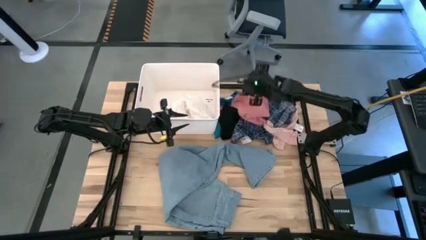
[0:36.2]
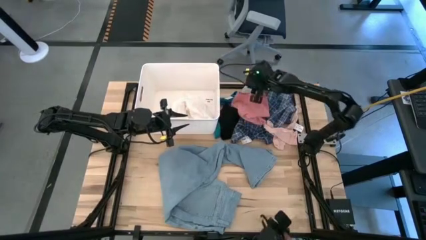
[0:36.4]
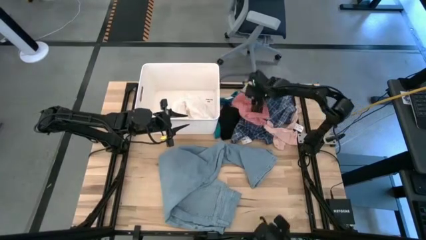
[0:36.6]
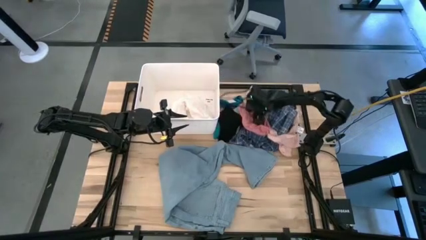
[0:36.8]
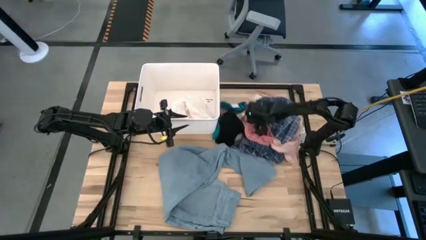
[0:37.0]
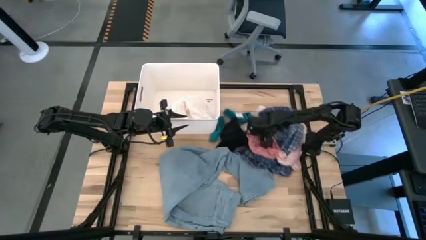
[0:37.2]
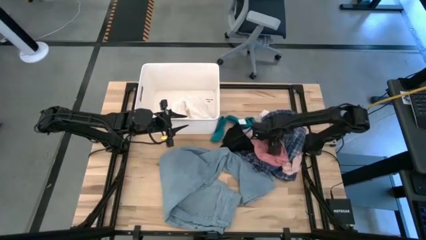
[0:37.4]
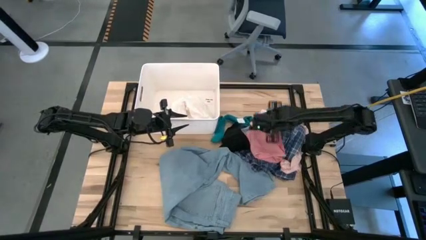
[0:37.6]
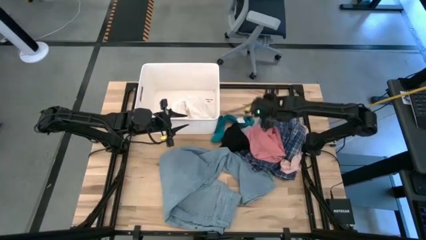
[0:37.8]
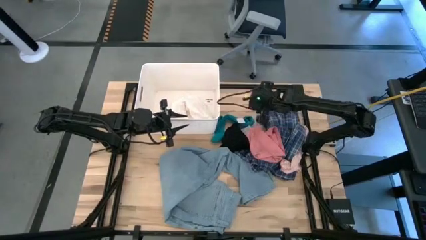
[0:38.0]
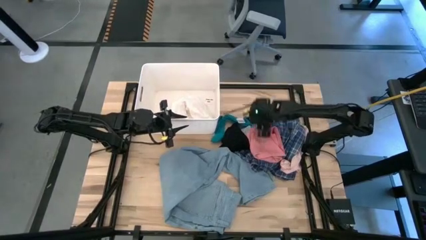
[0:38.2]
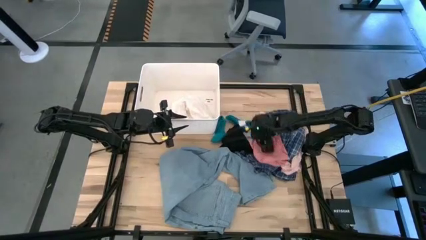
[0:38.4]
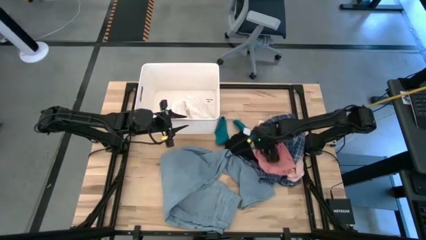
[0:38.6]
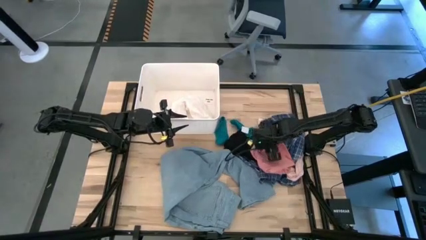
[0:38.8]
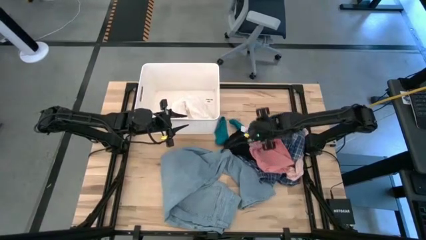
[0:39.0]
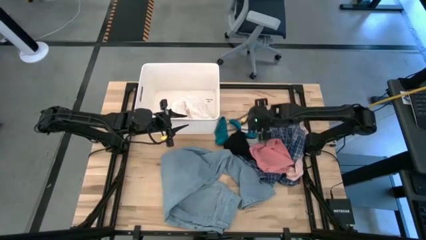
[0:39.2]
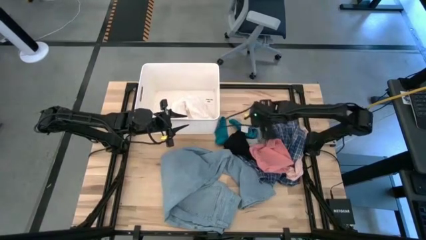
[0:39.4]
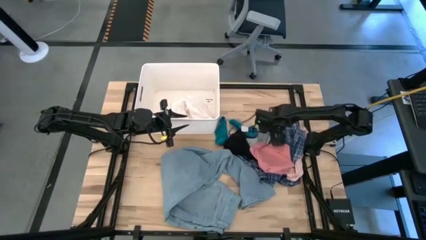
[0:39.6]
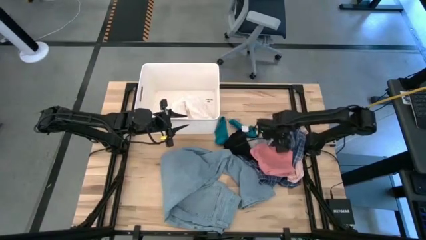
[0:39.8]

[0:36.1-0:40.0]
Task: Sort clothes
Move the pile of clothes to the middle right of the table

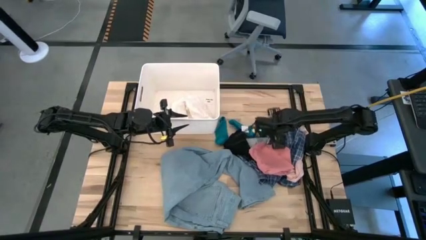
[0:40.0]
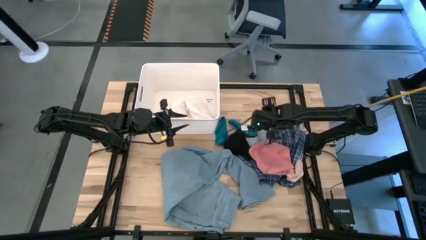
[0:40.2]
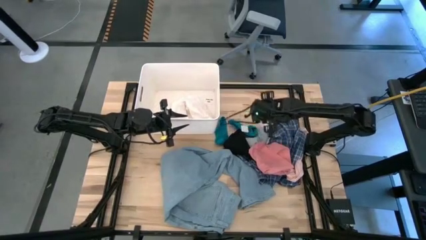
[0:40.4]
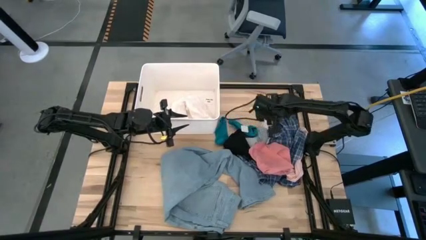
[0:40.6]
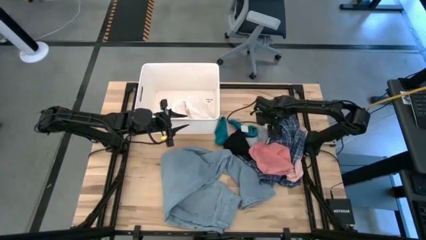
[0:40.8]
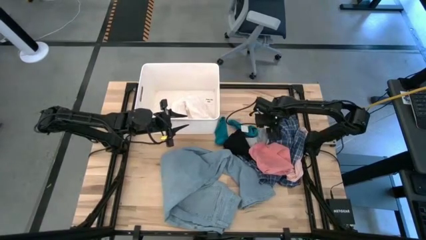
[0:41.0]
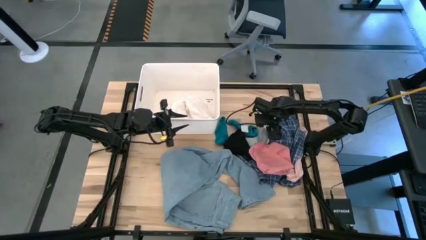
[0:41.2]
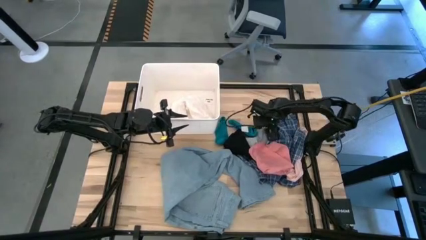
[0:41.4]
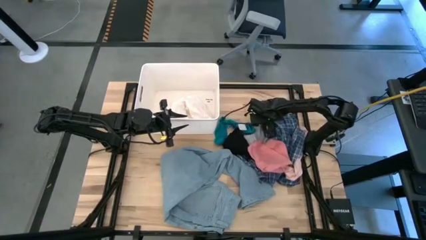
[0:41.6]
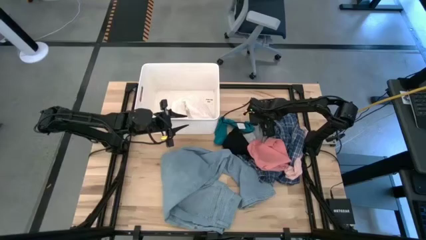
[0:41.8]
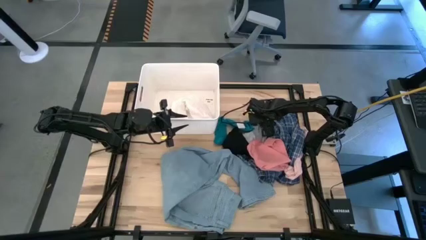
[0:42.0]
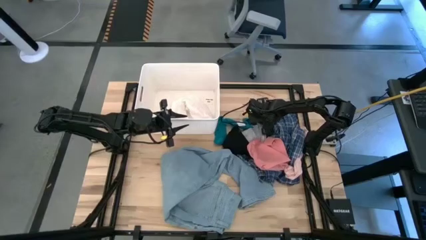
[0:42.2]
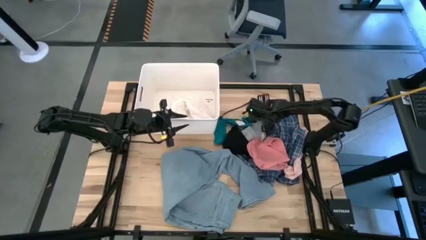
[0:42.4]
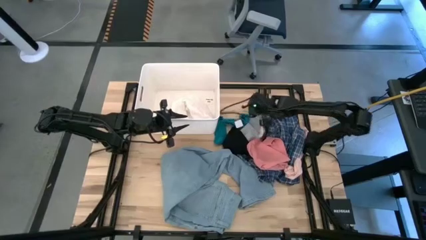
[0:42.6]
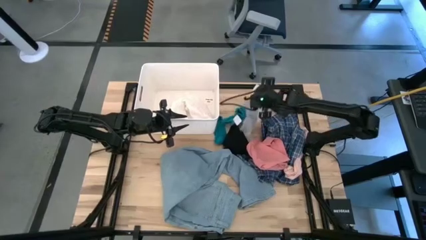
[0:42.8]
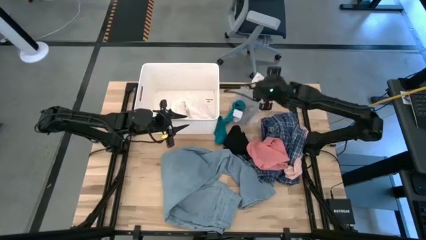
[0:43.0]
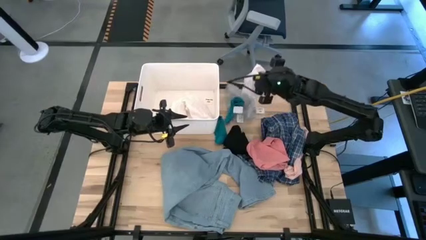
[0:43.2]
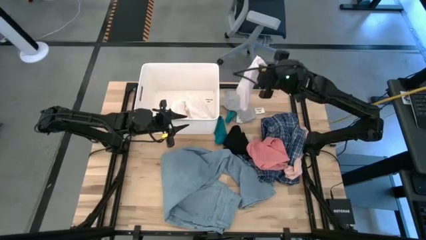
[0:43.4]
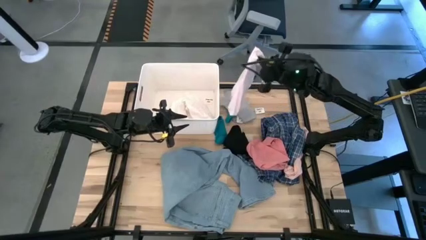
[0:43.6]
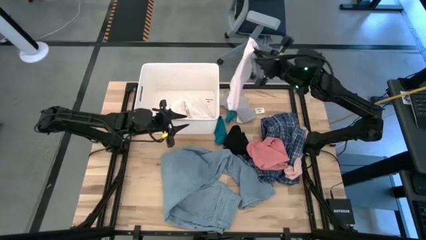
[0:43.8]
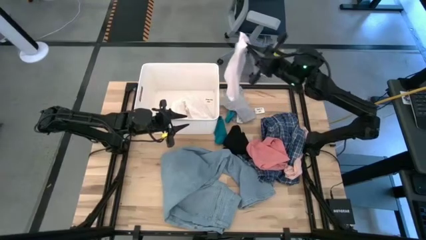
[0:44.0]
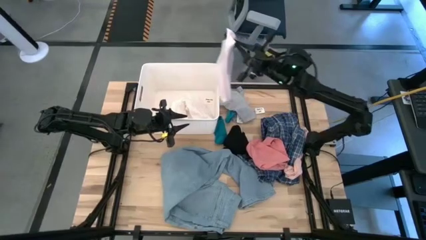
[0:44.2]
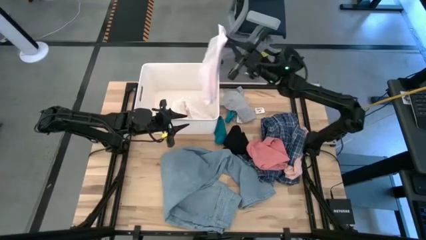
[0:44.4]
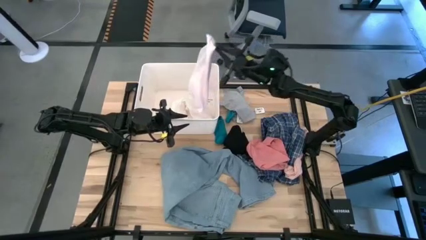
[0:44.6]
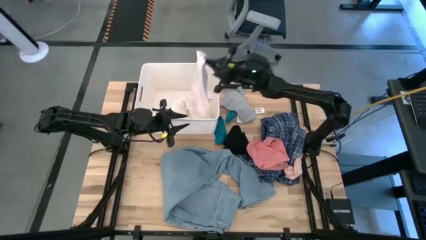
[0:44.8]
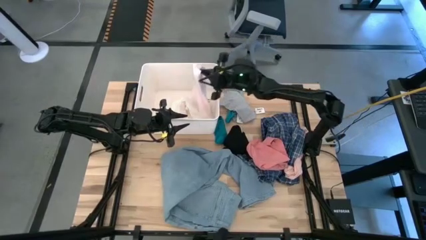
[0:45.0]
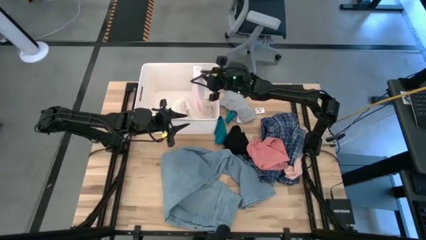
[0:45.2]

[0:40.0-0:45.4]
Put the white shorts into the white bin

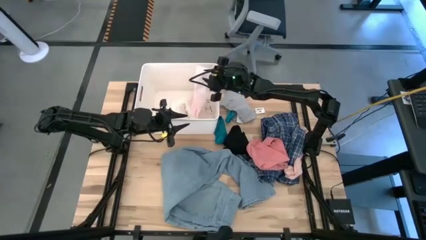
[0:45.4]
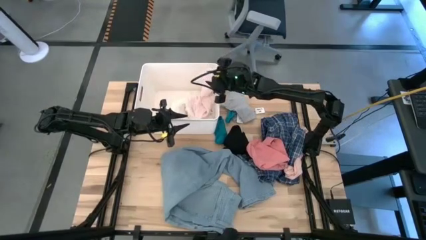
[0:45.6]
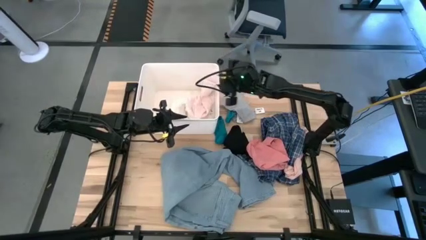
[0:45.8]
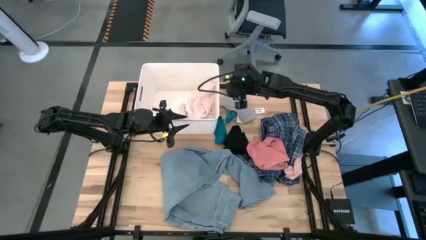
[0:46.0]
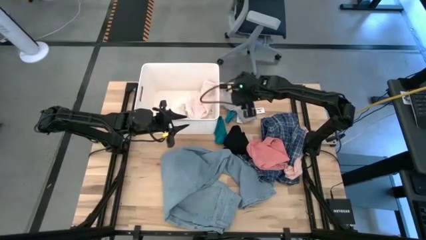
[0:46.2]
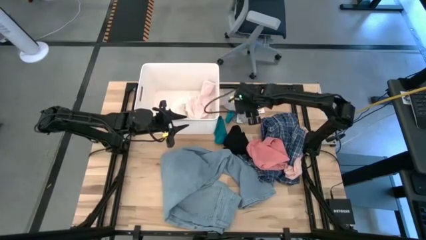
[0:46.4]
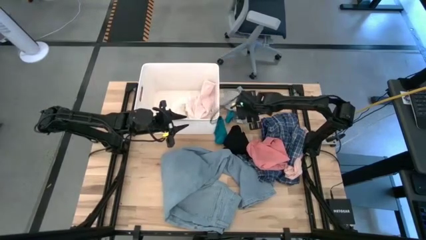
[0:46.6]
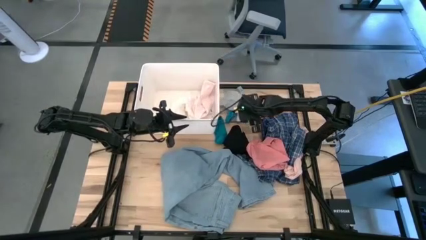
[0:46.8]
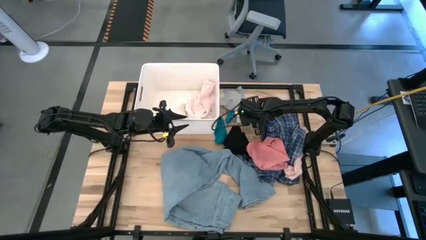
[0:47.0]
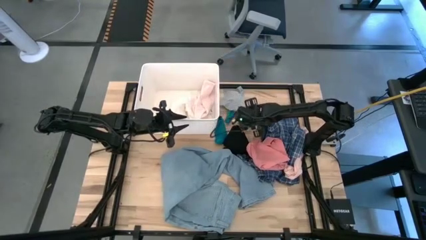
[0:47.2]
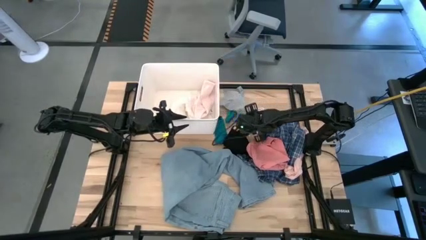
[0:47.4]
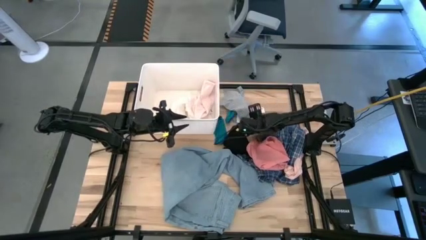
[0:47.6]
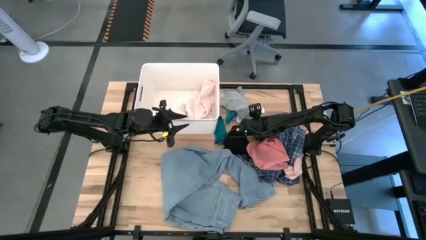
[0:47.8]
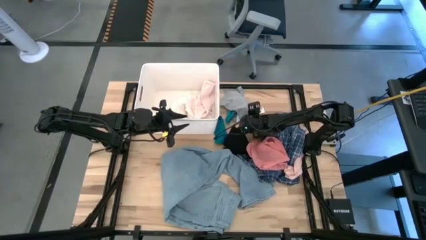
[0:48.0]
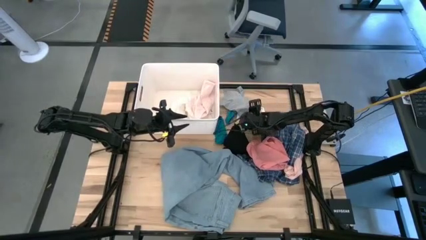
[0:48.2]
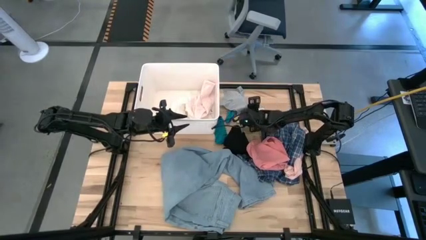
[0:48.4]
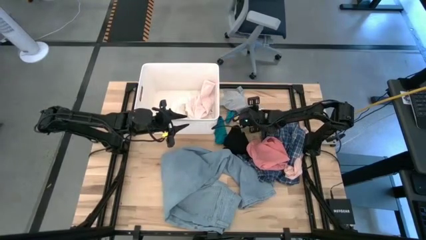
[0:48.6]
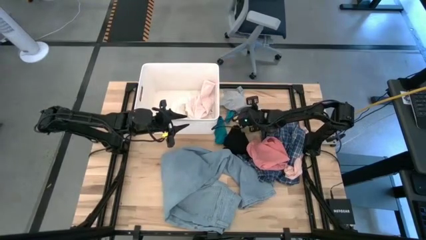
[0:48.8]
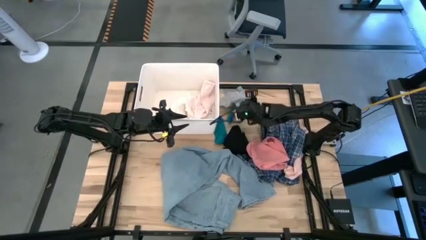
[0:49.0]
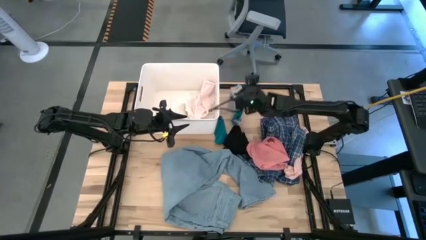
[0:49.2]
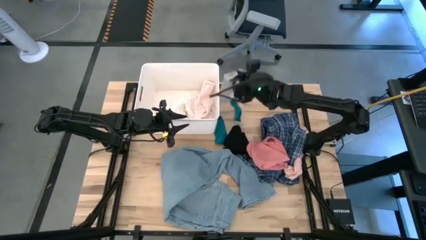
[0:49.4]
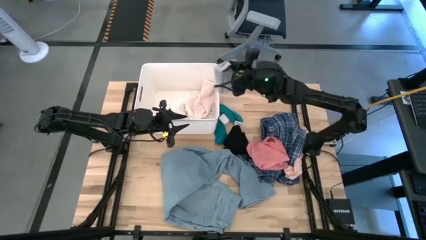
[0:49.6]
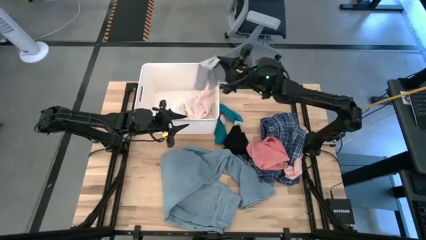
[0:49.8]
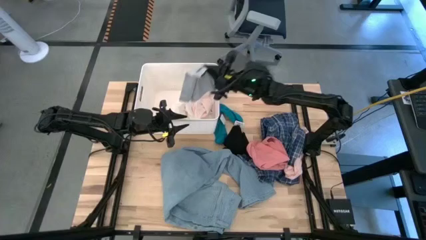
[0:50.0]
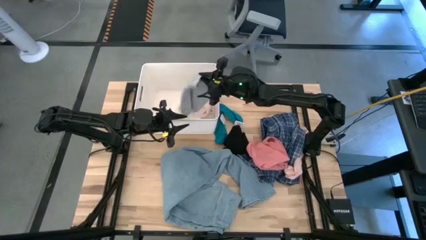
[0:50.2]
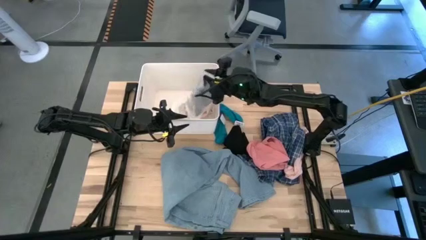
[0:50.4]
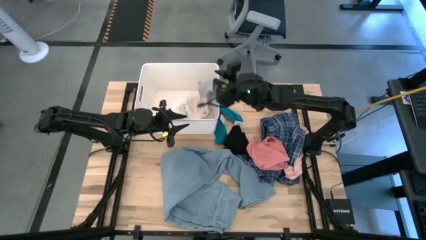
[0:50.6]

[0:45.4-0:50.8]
Put the grey shorts into the white bin
